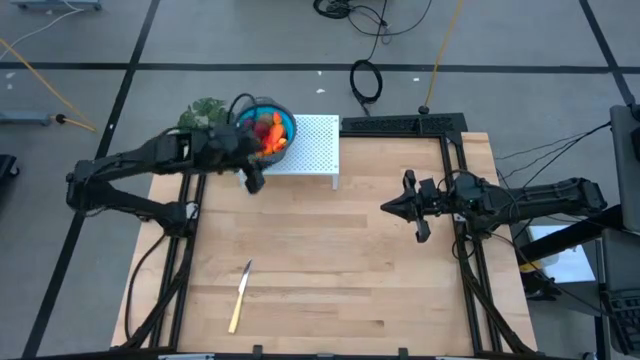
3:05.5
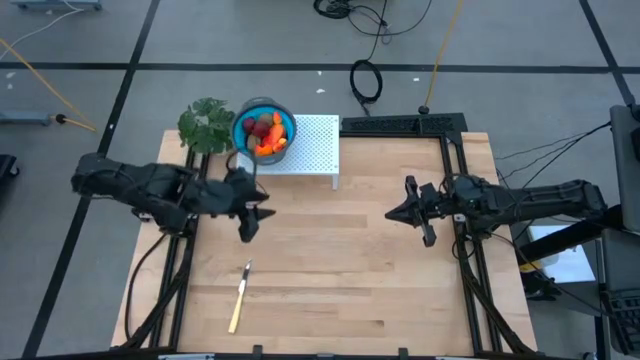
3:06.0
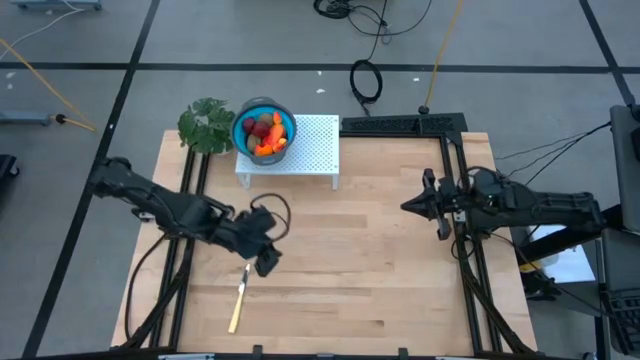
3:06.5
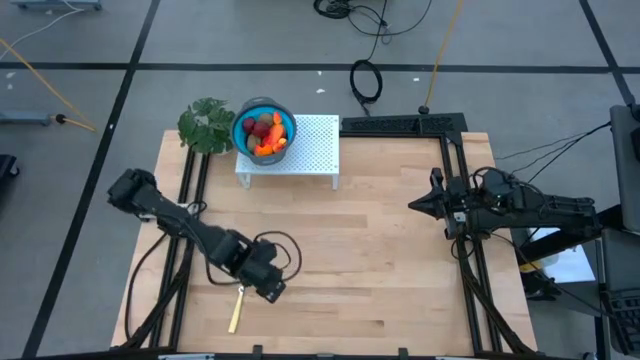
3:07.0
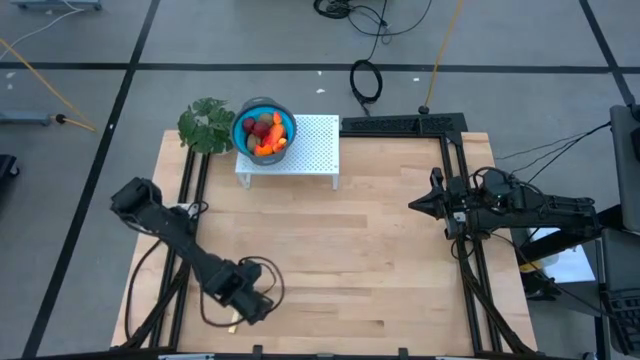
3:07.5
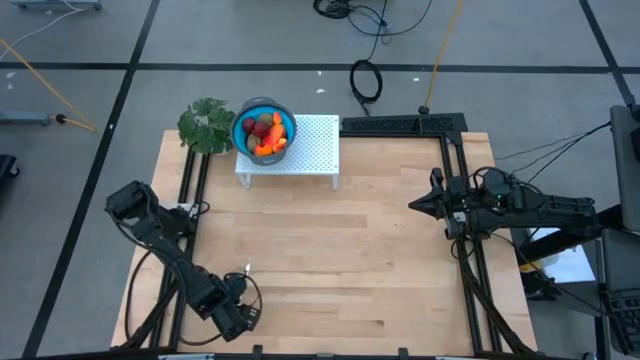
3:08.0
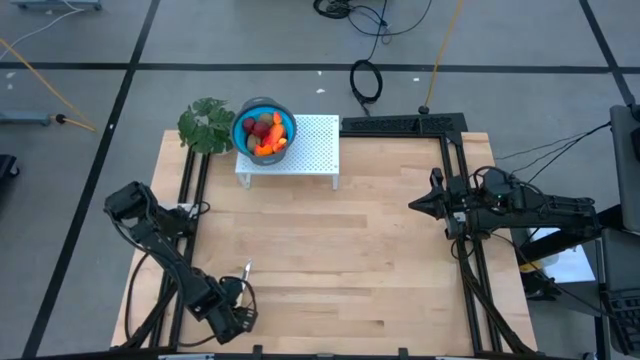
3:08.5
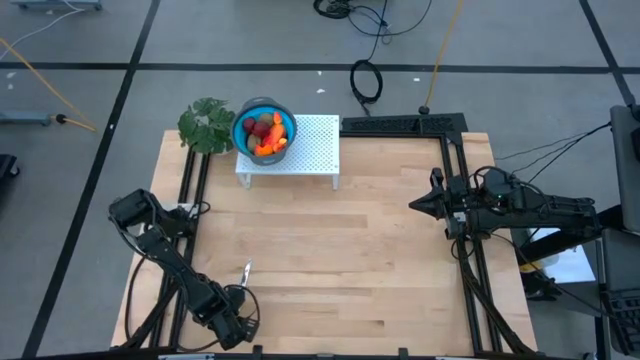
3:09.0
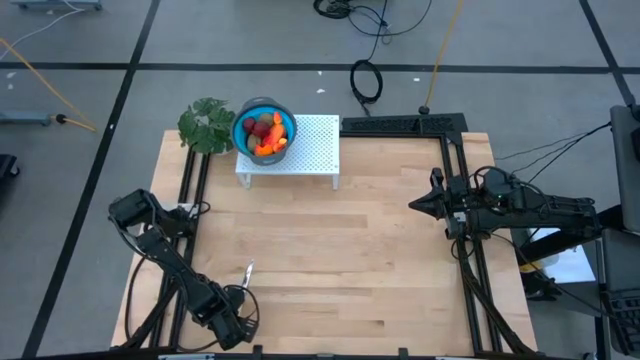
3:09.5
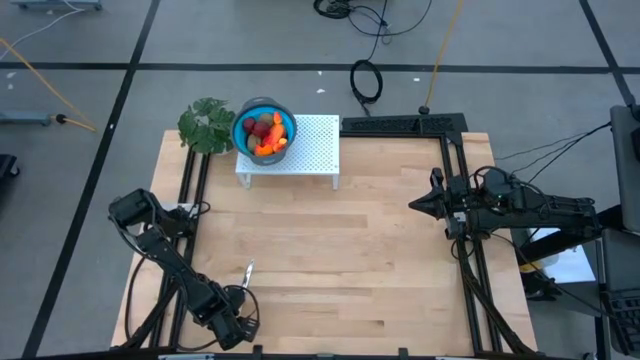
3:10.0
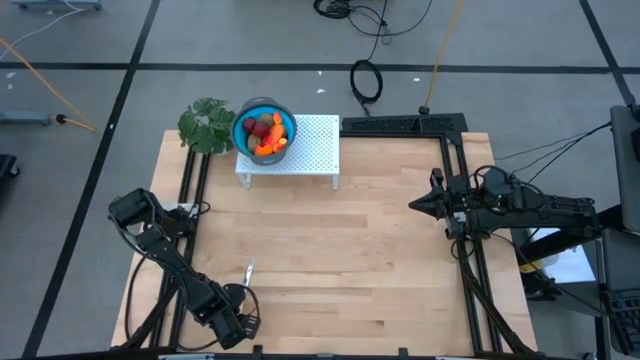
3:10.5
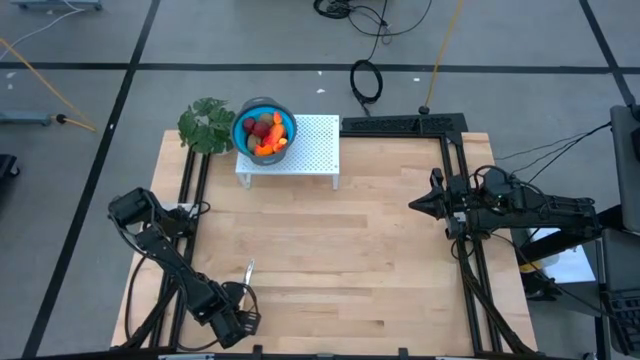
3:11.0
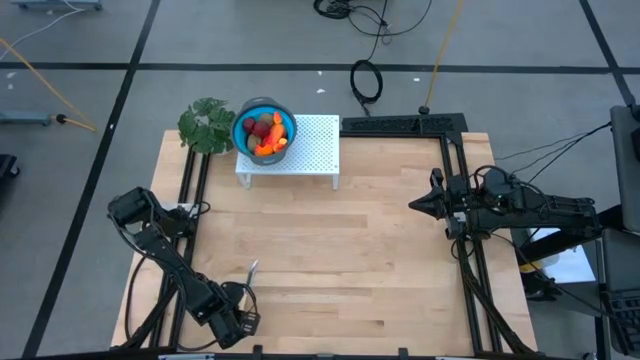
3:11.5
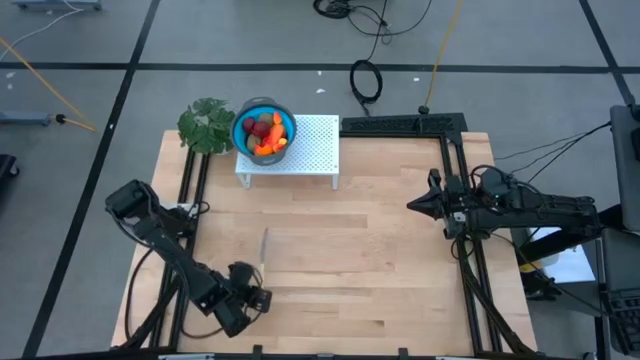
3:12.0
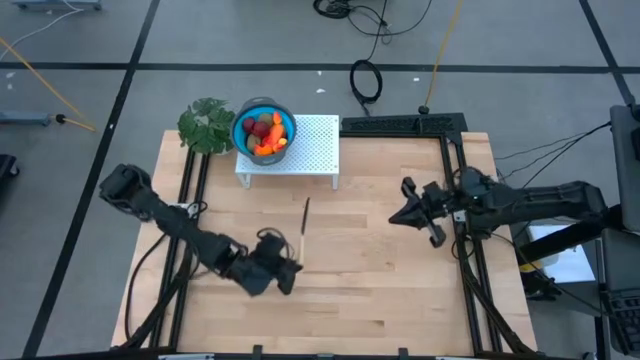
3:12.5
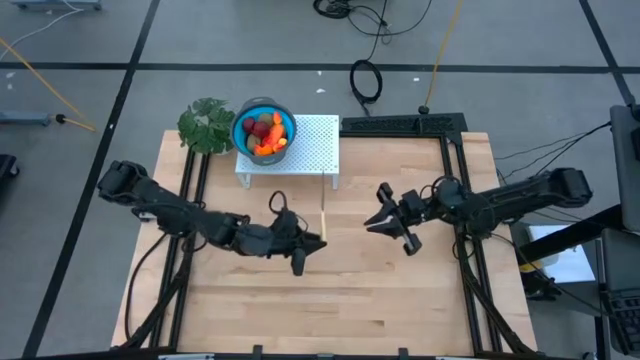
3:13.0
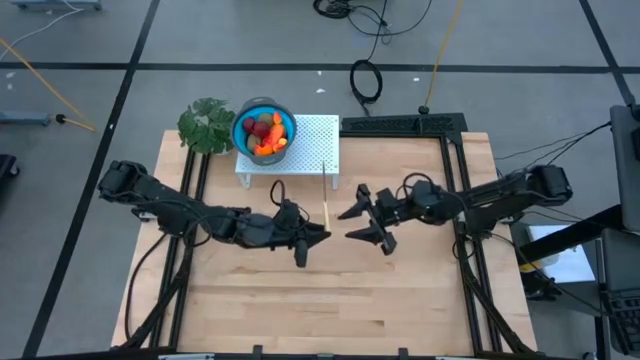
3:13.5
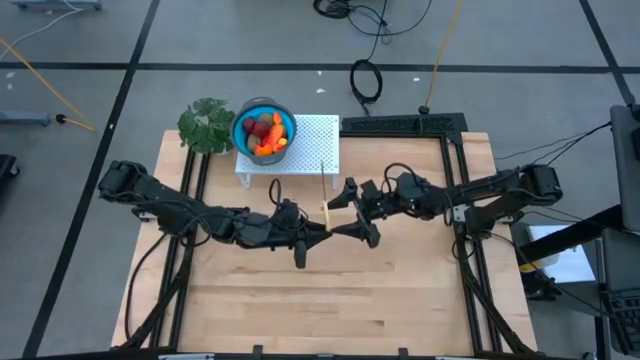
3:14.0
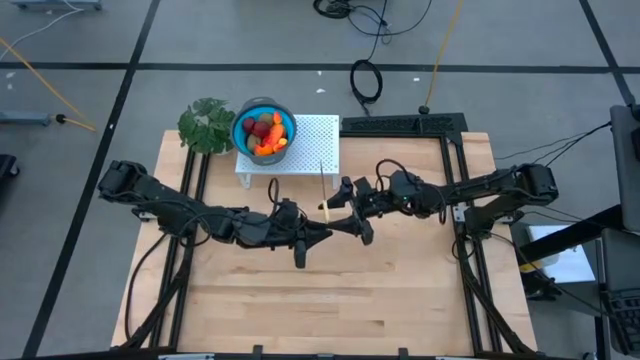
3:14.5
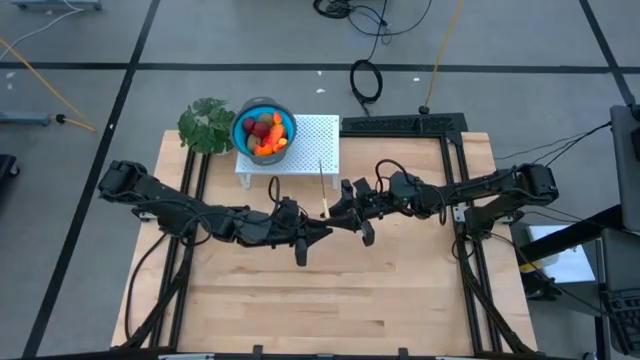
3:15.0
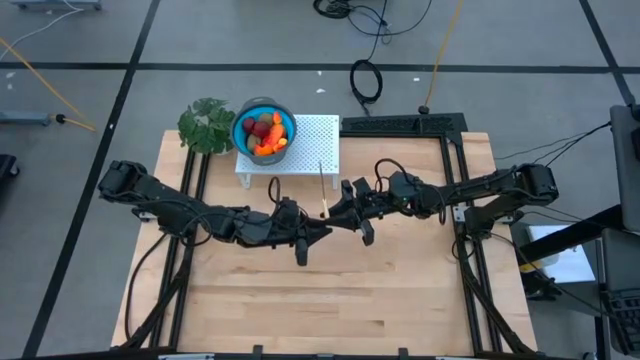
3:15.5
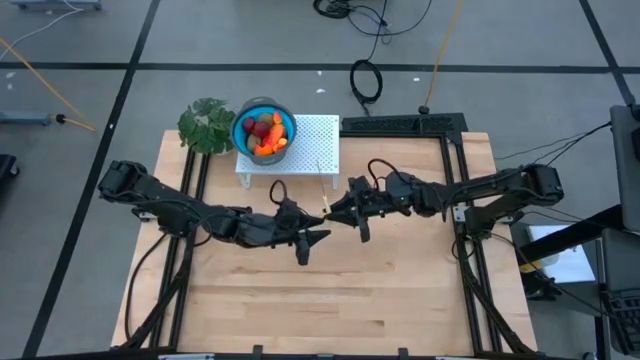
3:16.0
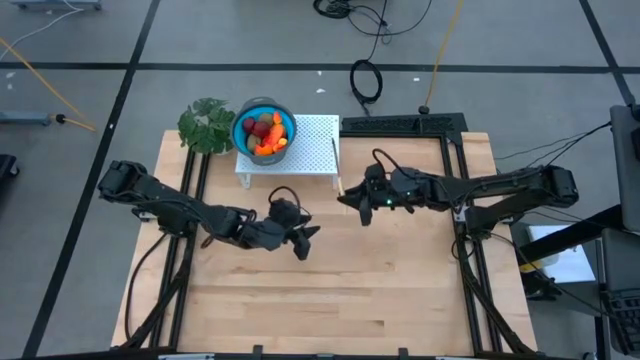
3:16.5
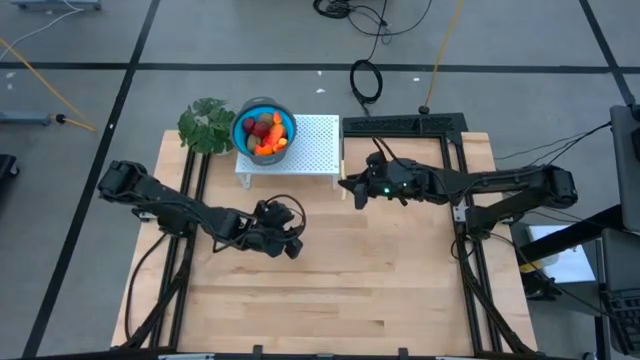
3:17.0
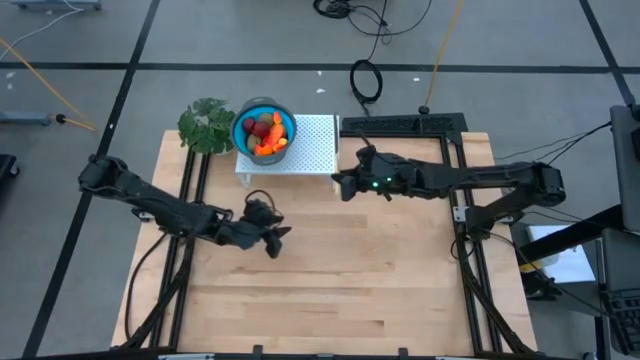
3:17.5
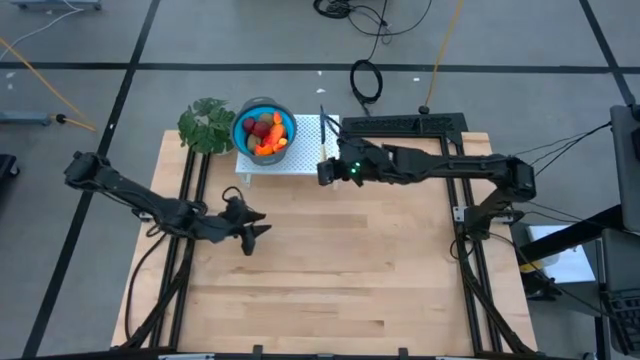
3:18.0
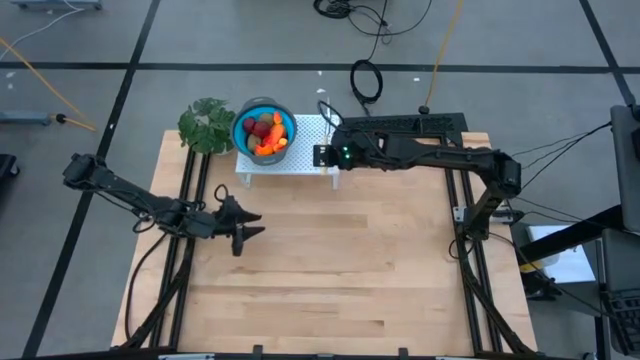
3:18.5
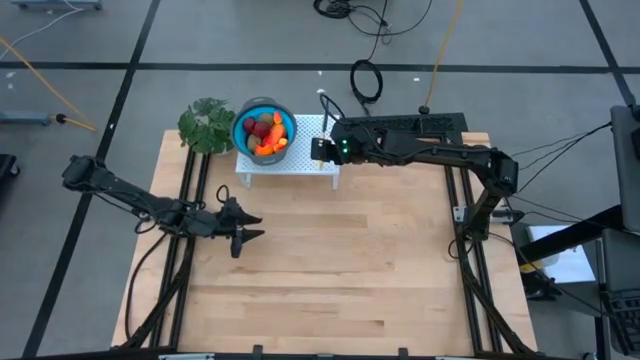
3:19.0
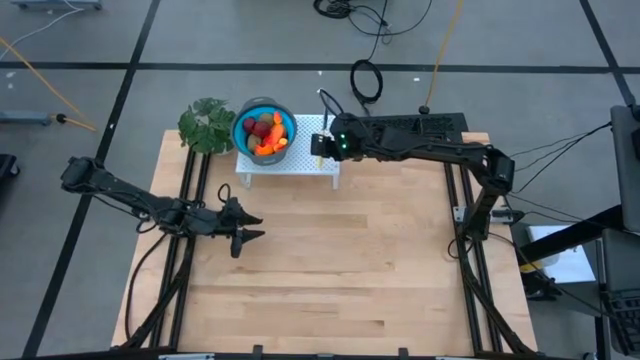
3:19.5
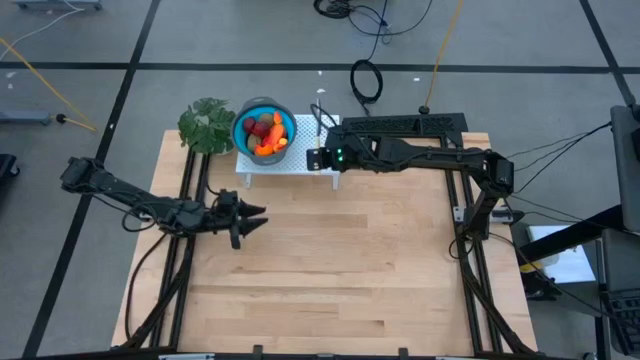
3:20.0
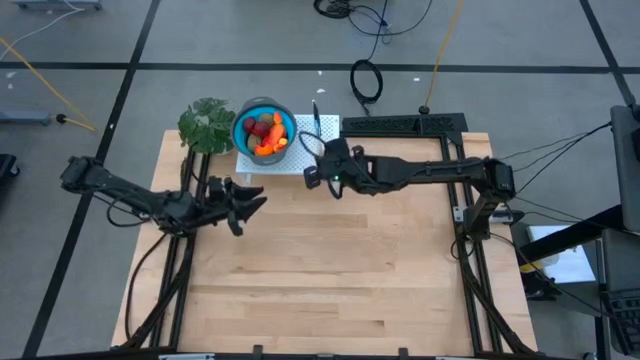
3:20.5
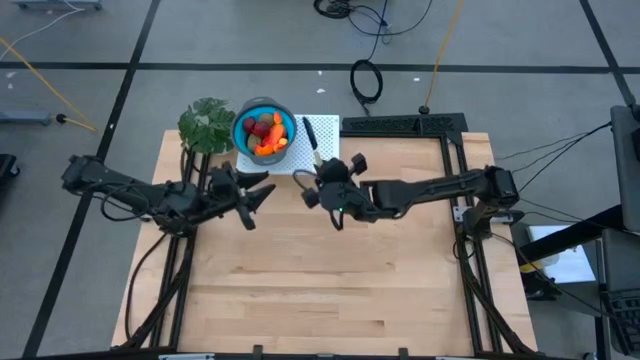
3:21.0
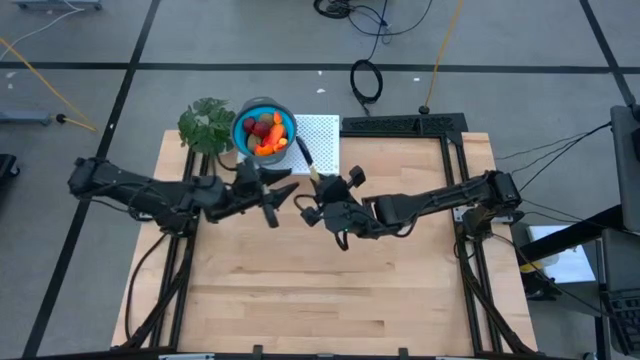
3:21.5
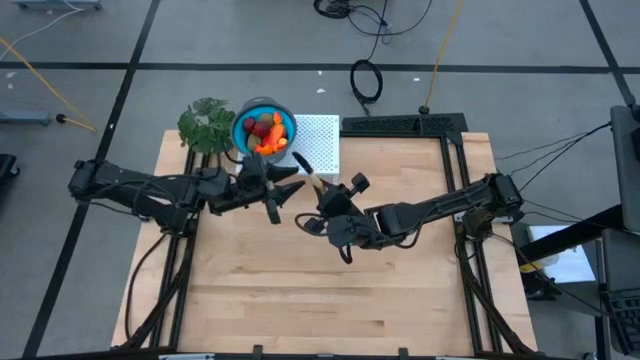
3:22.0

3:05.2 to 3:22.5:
Task: Pick & Place Fruit
Put the yellow table knife on the shelf

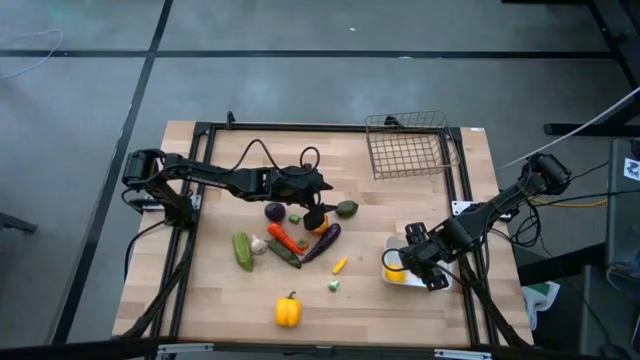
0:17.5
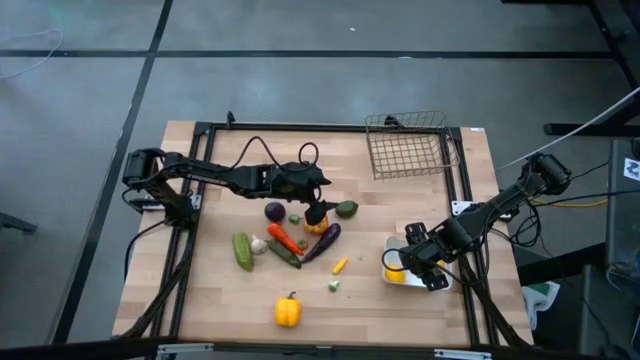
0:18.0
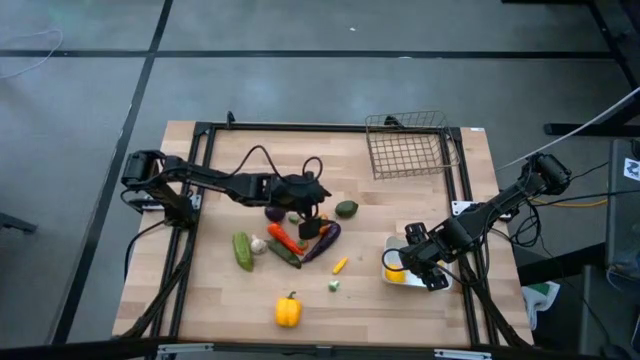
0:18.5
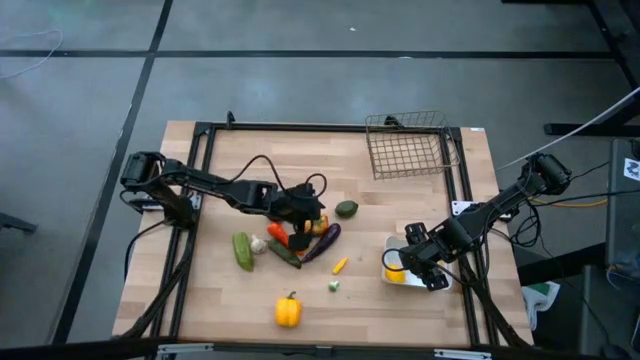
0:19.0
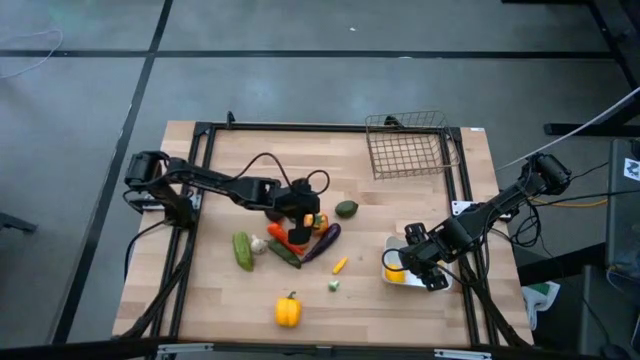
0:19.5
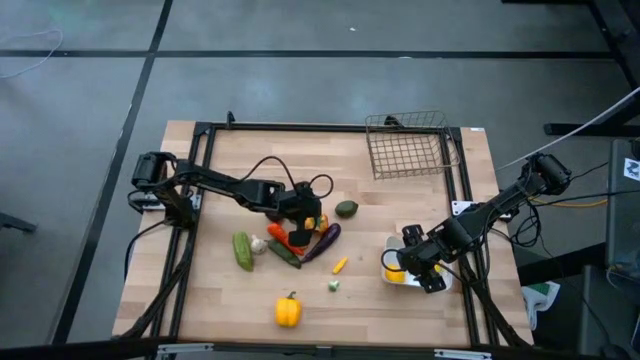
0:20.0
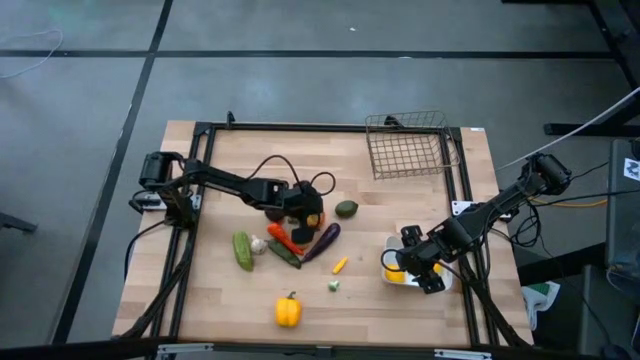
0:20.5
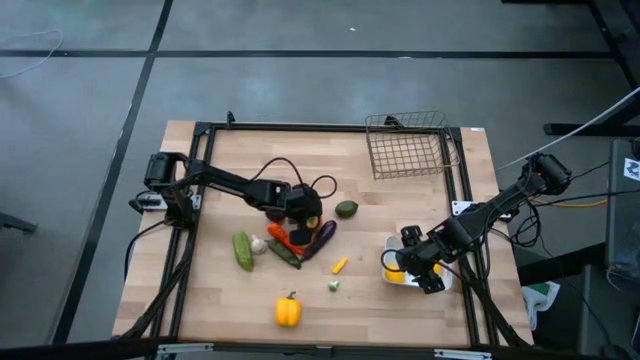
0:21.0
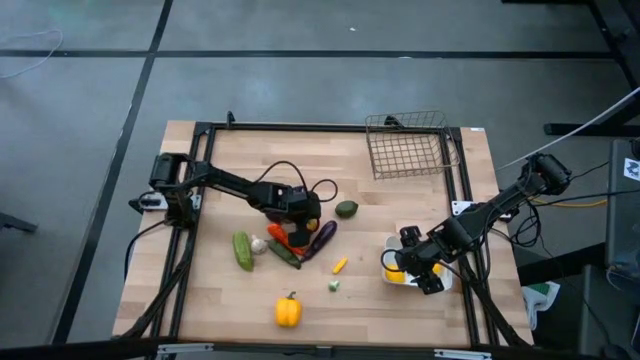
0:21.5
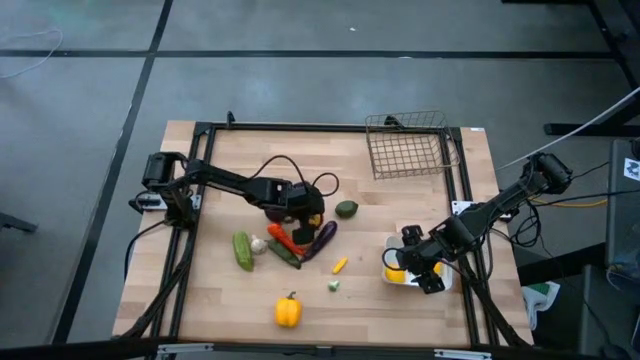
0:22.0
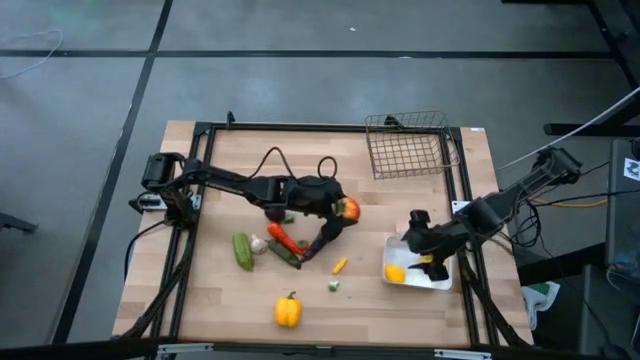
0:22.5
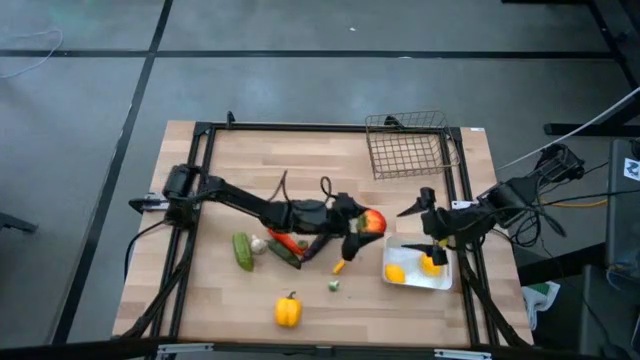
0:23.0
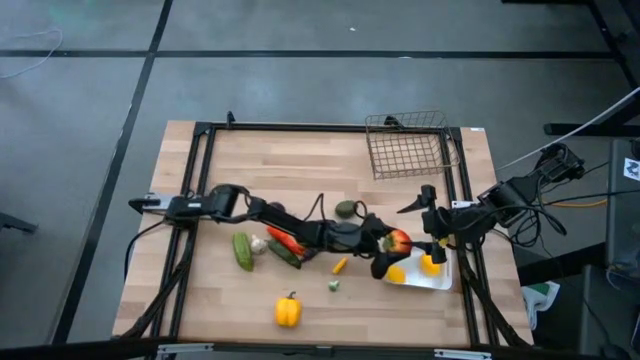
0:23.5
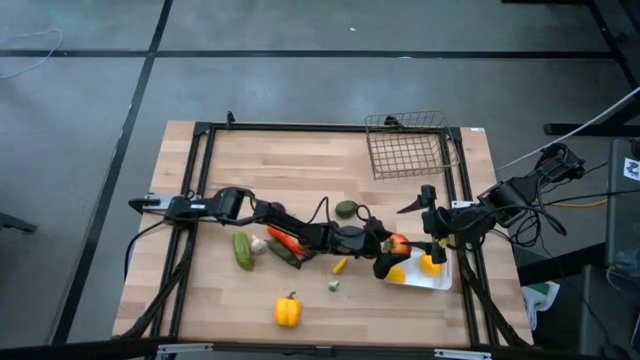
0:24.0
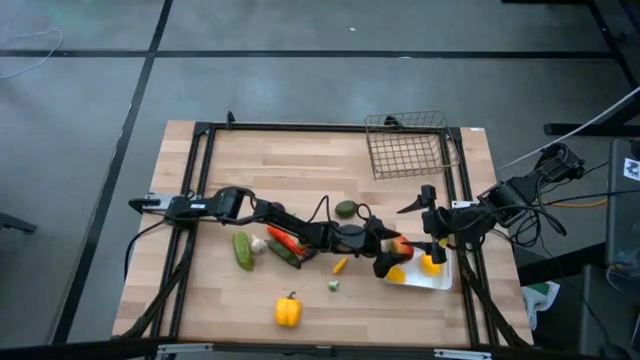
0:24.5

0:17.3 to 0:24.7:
Task: Sort produce into baskets
Put the top orange tomato into the white bin
